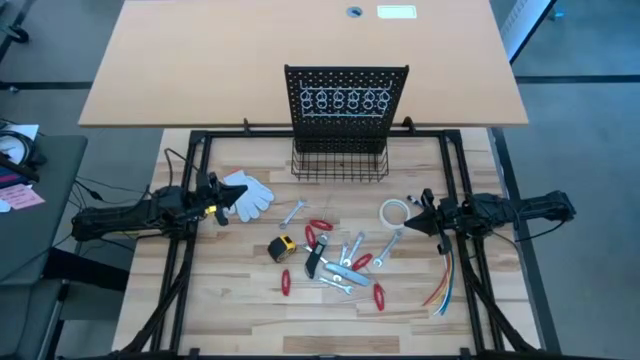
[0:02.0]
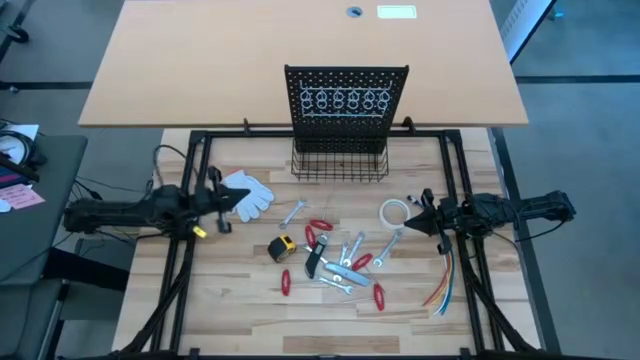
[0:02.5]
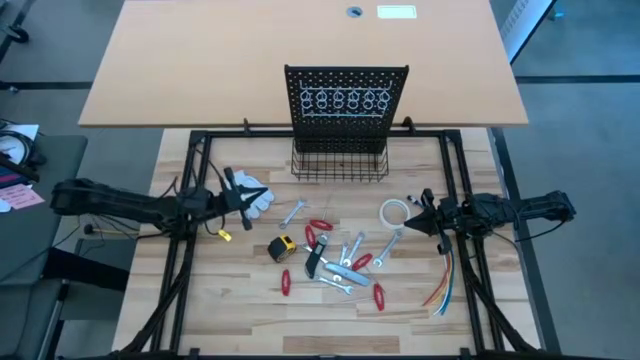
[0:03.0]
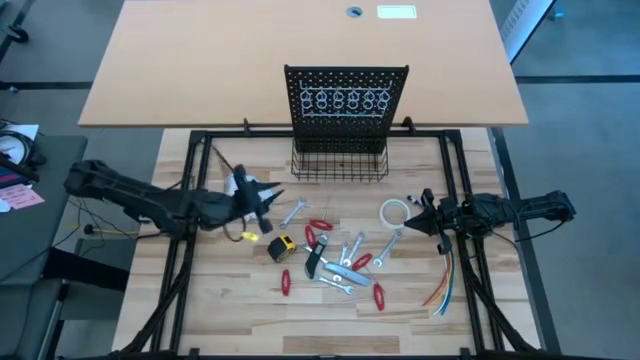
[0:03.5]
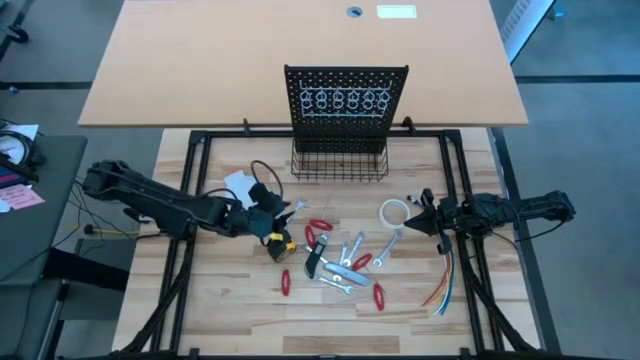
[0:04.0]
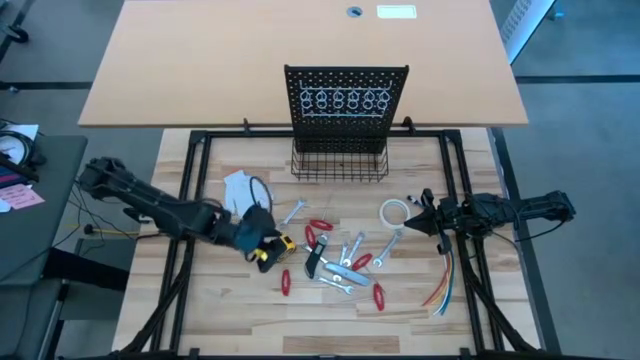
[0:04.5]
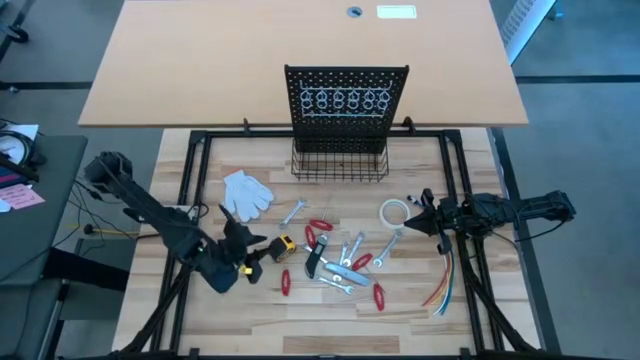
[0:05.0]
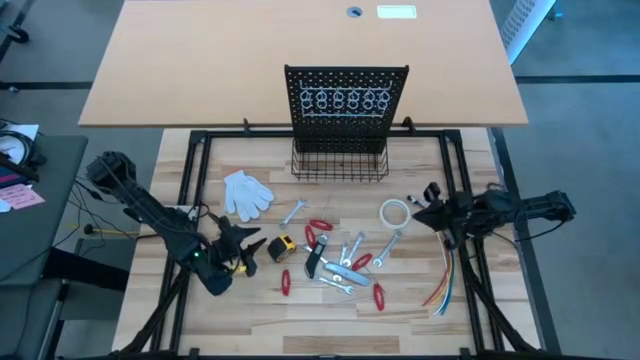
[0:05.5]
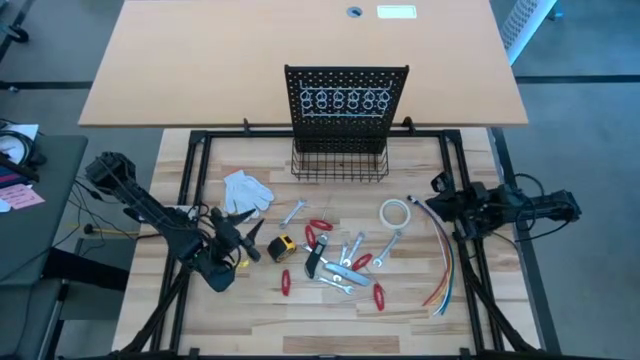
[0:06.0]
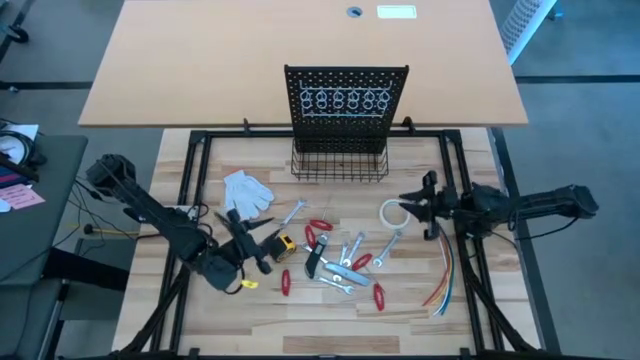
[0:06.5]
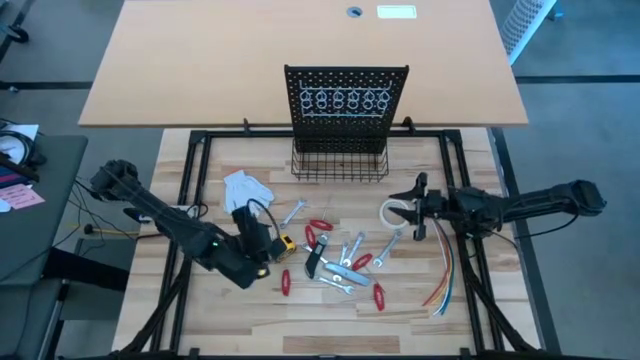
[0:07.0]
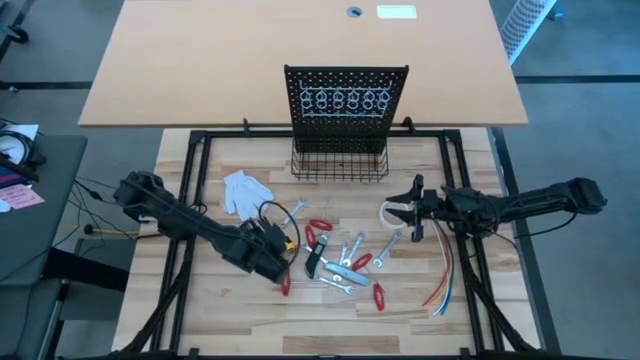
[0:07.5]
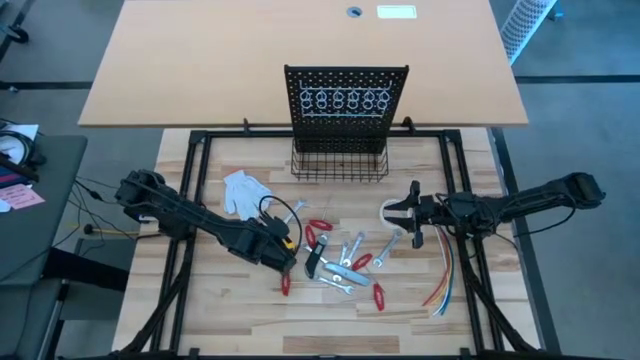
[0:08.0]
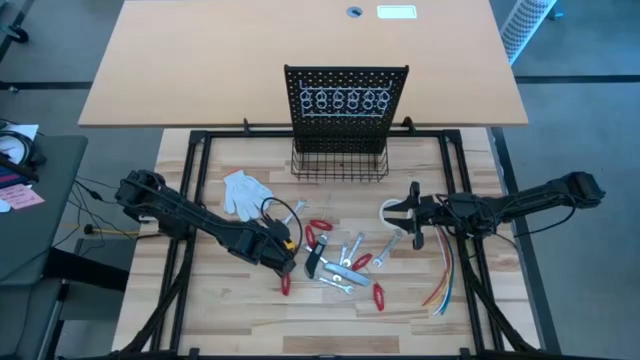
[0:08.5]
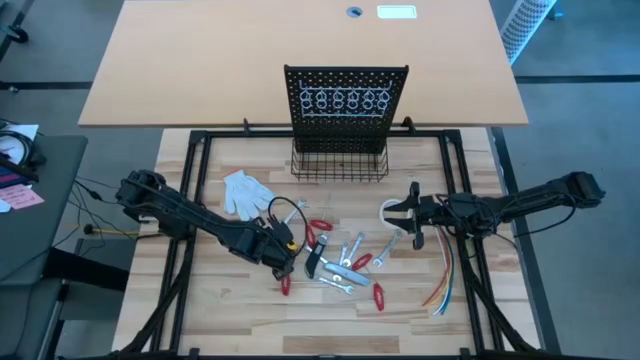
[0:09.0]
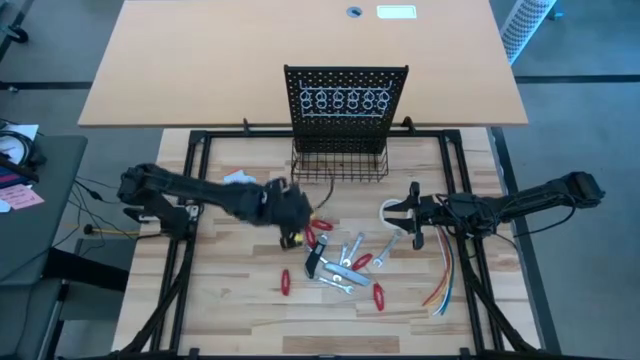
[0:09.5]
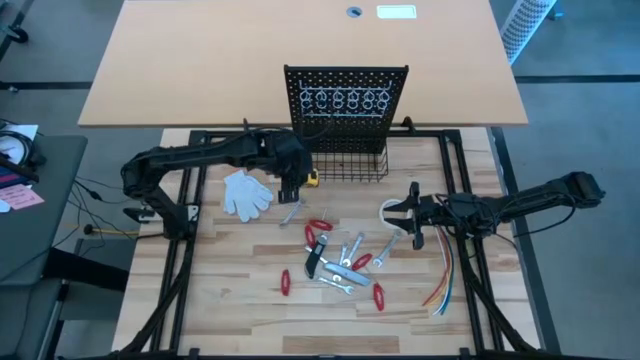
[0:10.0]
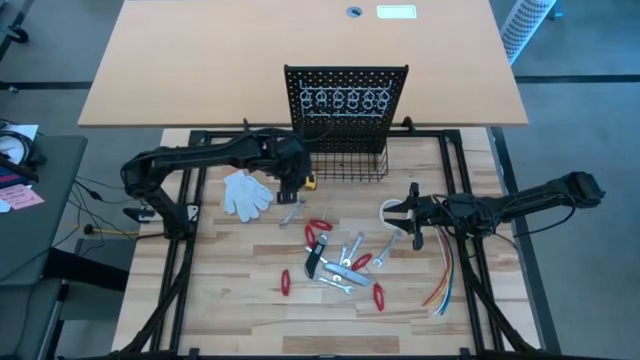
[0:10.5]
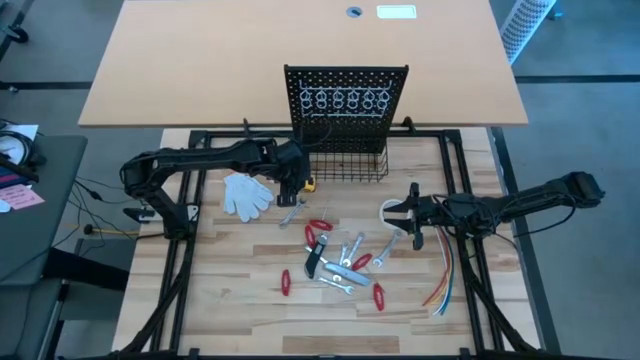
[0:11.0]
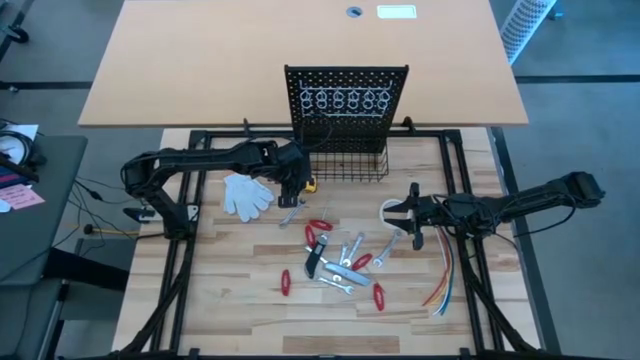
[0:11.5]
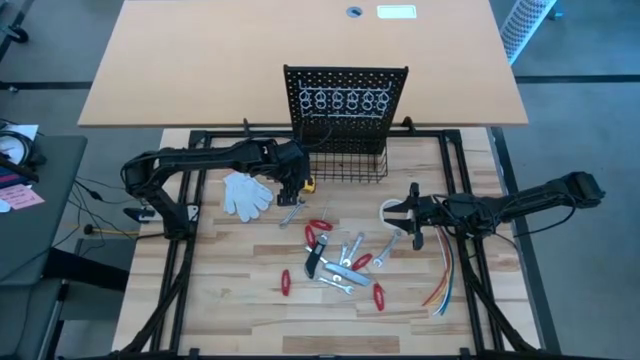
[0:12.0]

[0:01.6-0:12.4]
Task: Hang tools onto peg board
Hang the black-yellow measuring tape on the black wire basket of the peg board

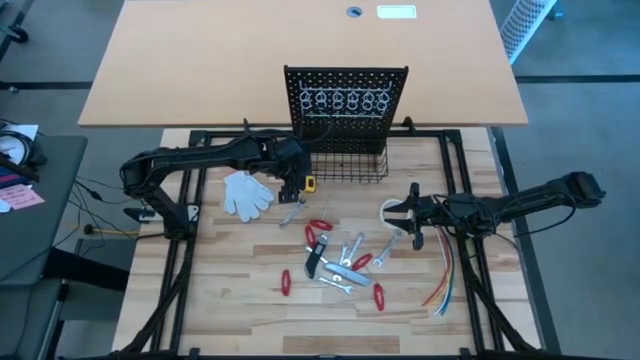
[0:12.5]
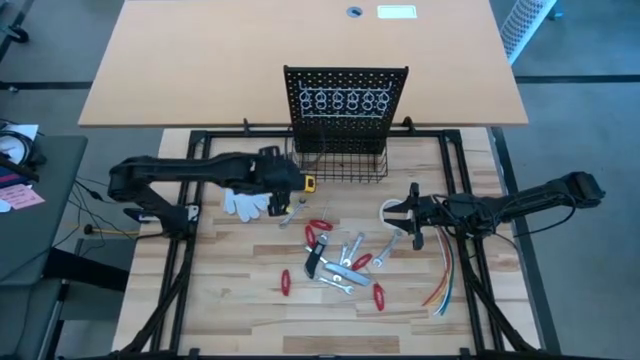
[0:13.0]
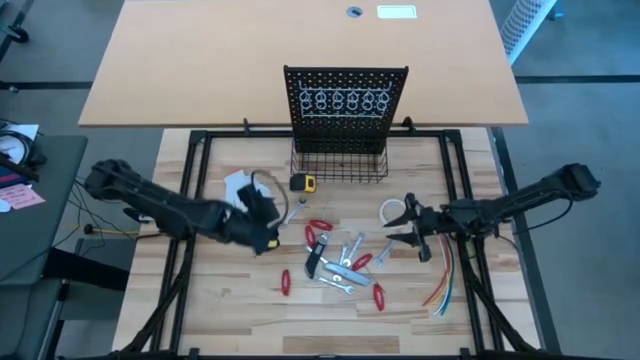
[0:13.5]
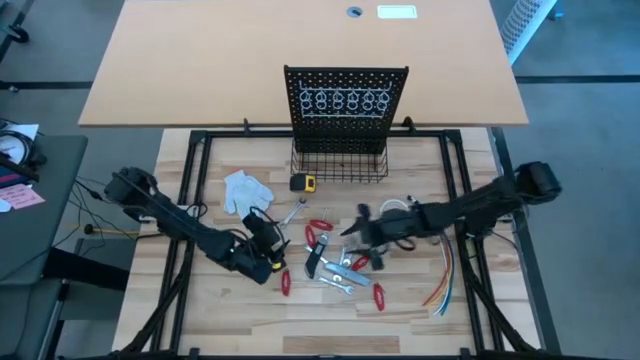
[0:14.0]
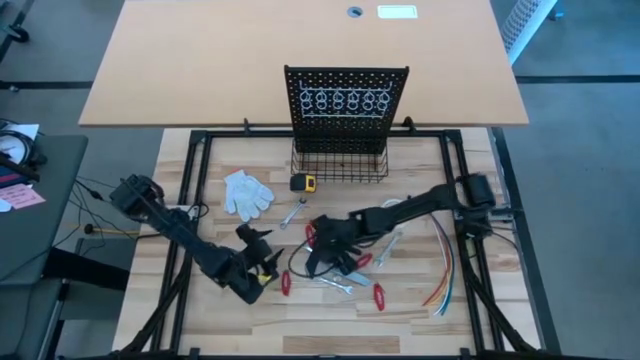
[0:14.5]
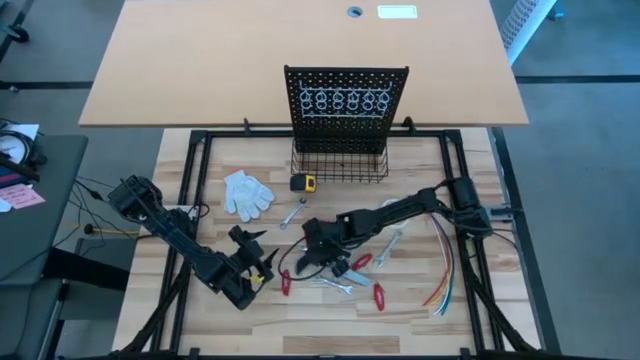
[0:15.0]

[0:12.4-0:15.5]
Put the black cutter into the black wire basket of the pegboard

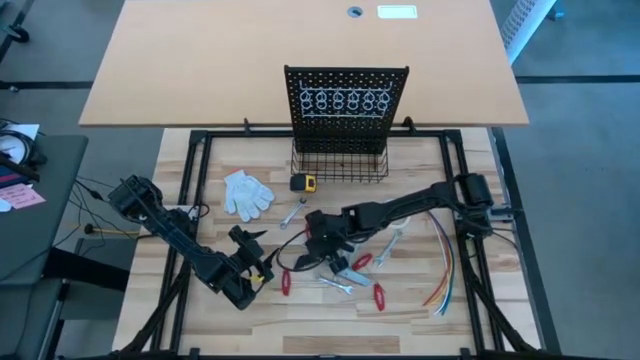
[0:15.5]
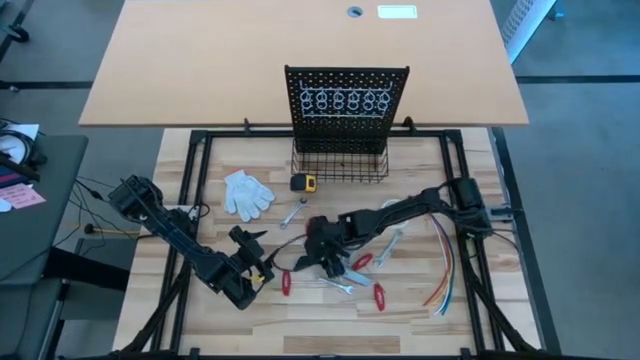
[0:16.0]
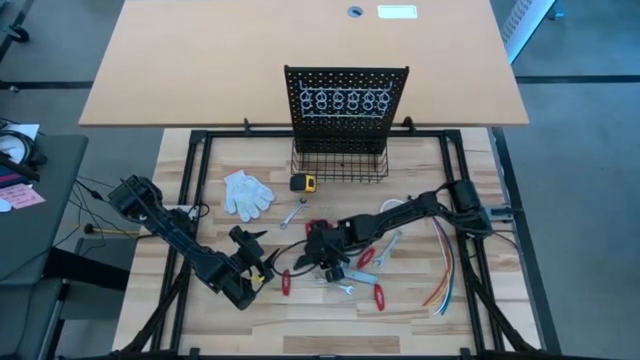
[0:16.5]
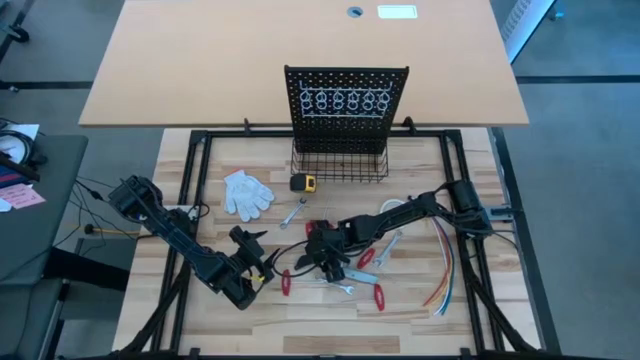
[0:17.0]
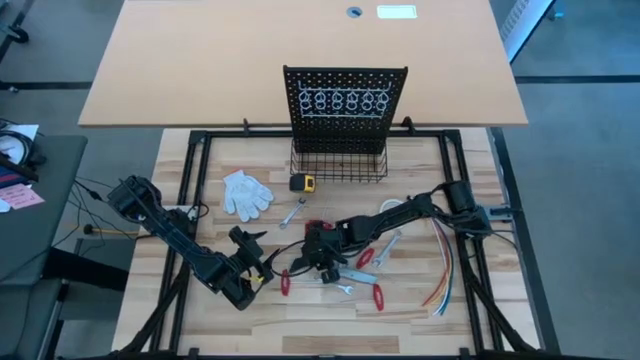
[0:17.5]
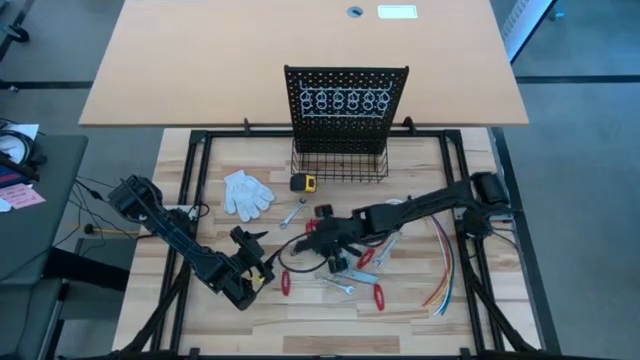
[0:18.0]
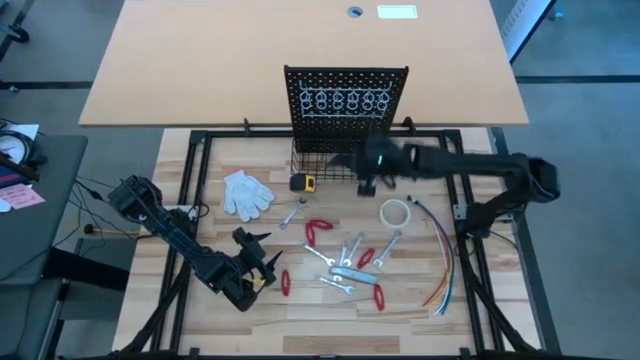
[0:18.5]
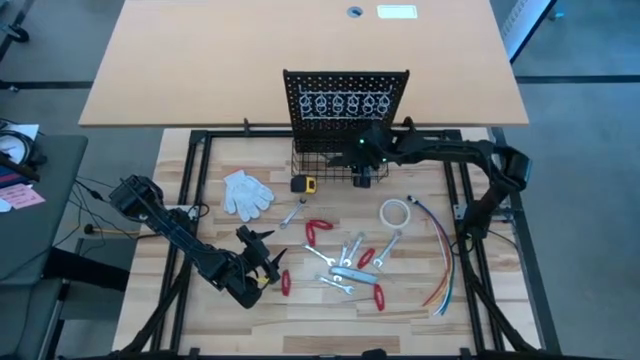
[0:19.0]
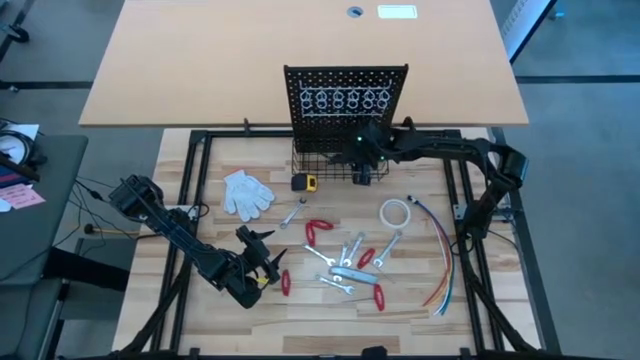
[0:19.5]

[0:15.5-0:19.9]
Put the black cutter into the black wire basket of the pegboard

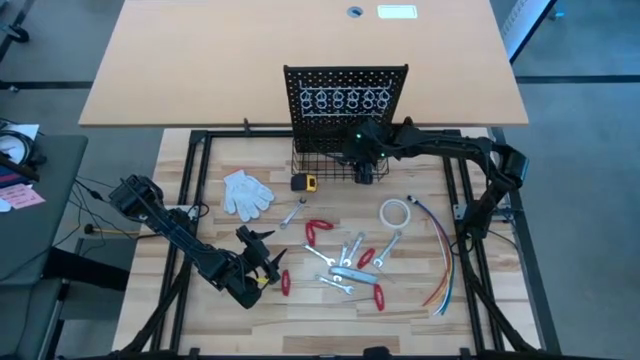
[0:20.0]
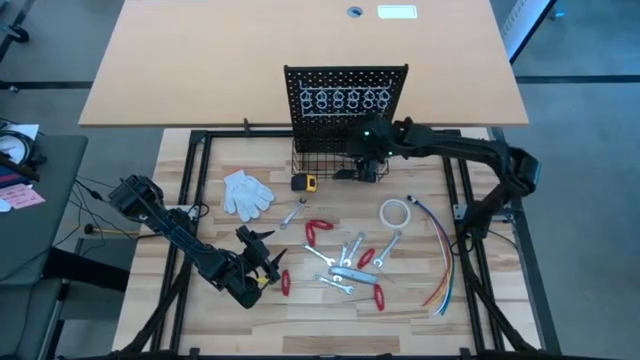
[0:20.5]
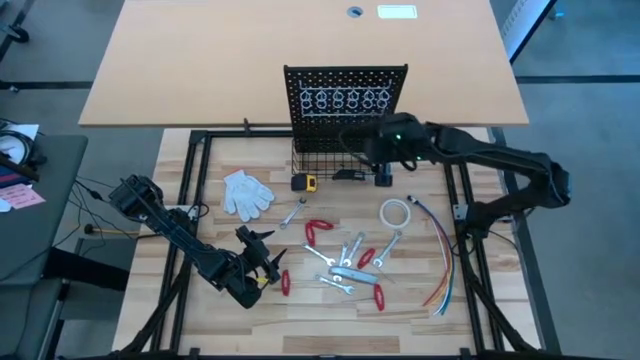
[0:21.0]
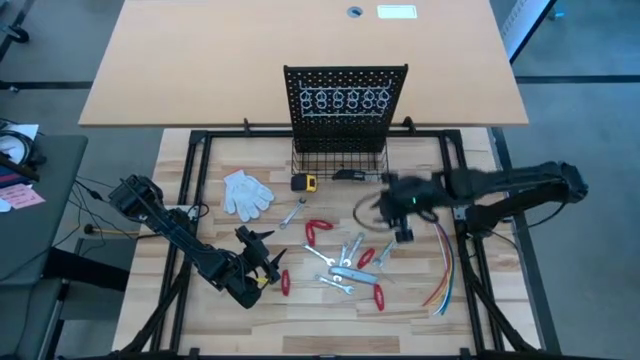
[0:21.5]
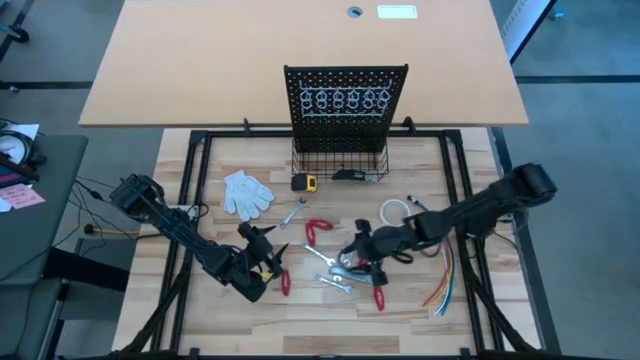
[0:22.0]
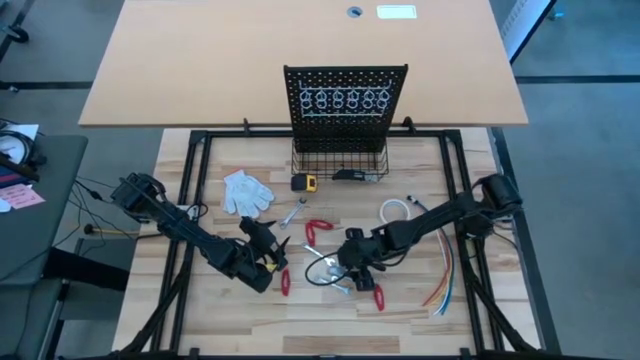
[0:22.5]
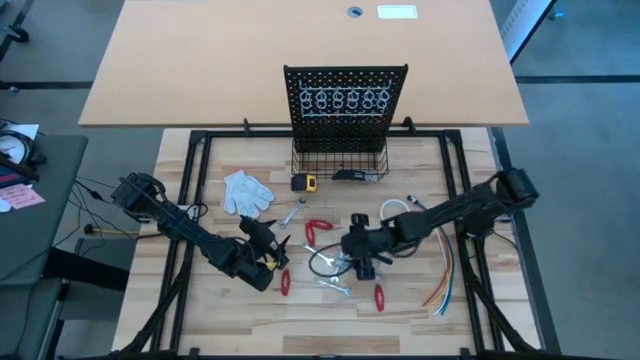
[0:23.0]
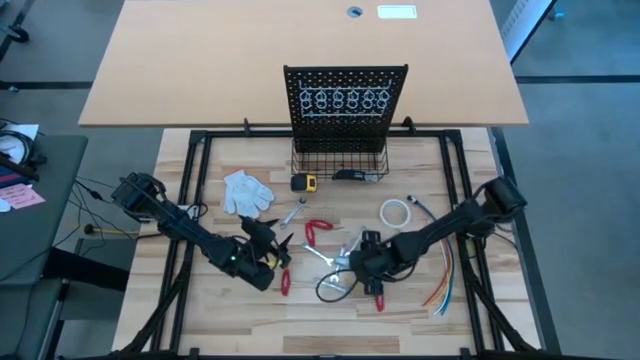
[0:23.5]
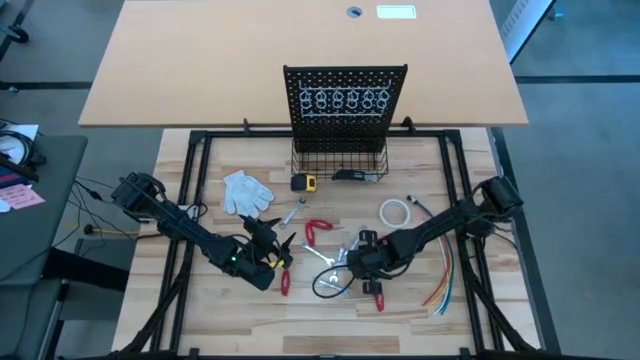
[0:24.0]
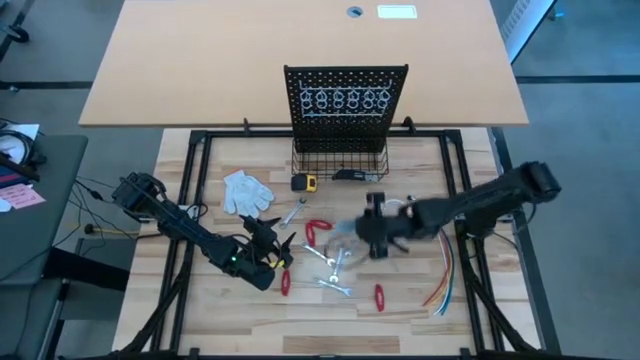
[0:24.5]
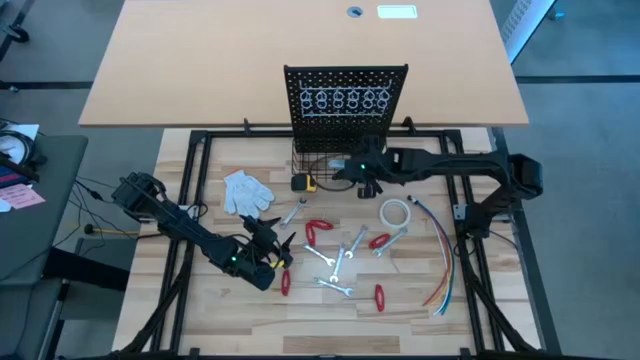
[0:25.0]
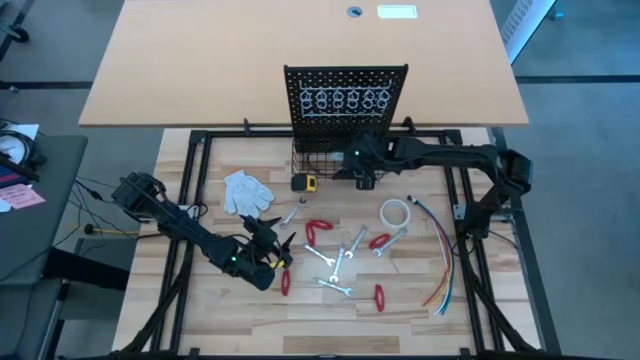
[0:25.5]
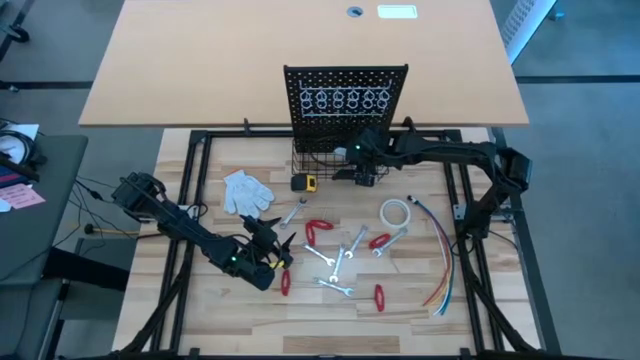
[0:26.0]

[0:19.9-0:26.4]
Put the gray cutter into the black wire basket of the peg board
